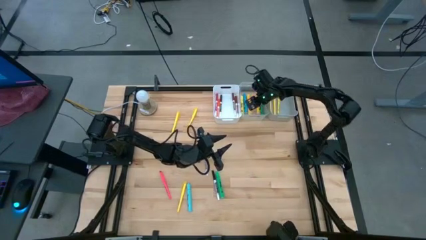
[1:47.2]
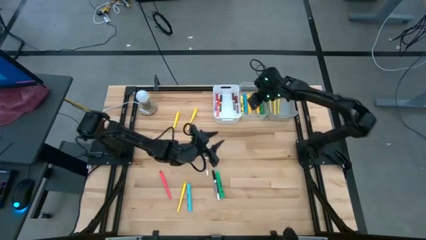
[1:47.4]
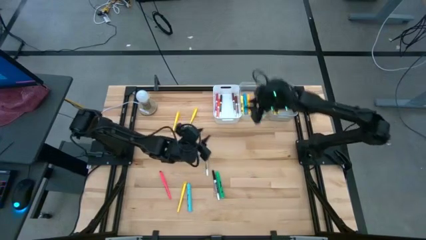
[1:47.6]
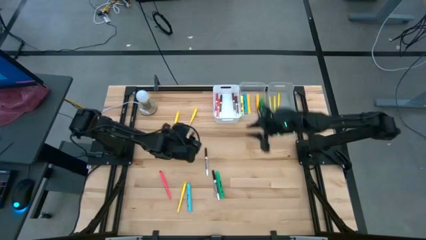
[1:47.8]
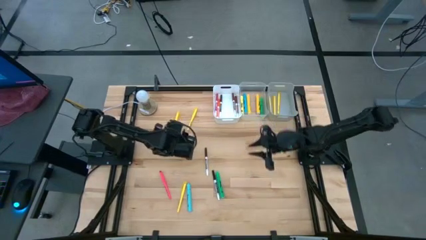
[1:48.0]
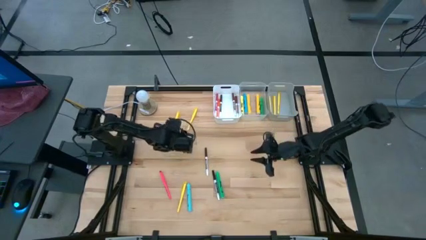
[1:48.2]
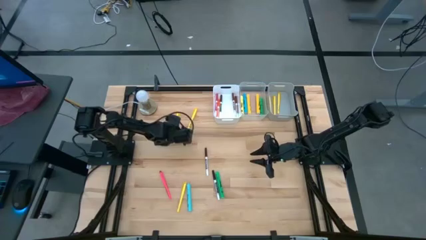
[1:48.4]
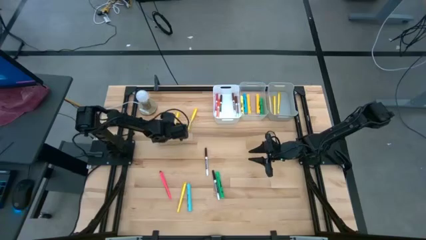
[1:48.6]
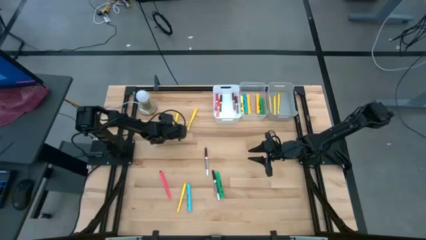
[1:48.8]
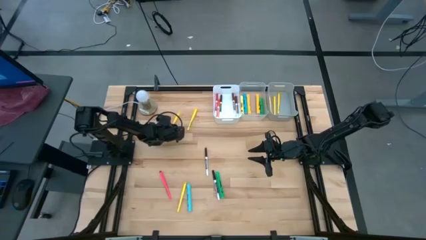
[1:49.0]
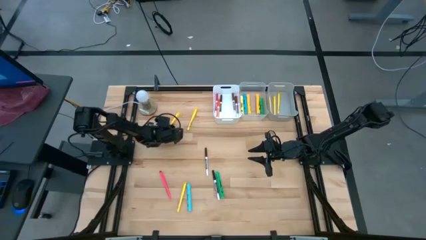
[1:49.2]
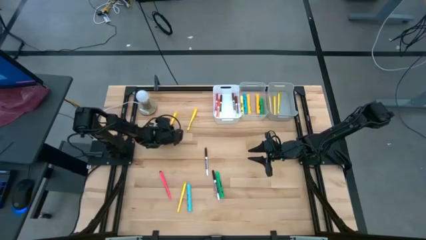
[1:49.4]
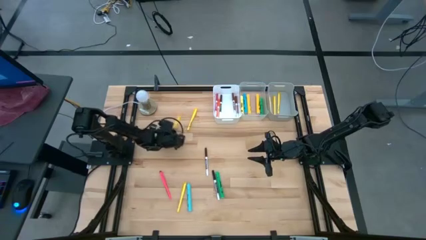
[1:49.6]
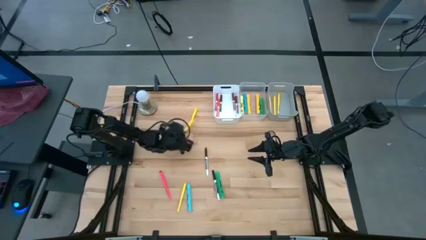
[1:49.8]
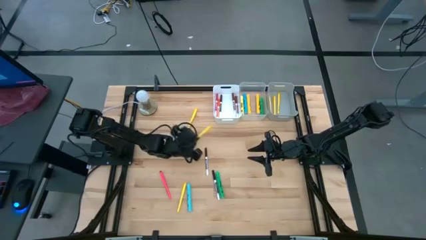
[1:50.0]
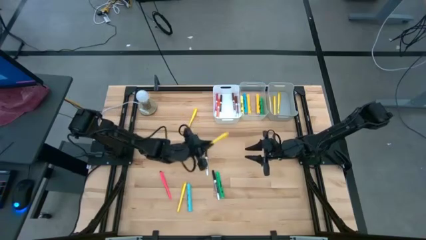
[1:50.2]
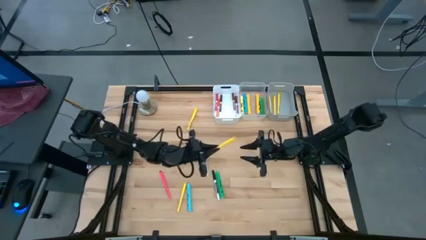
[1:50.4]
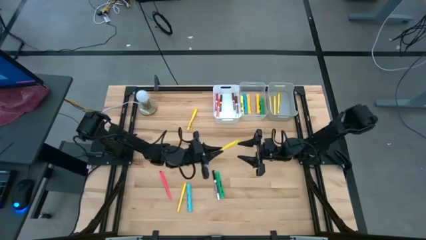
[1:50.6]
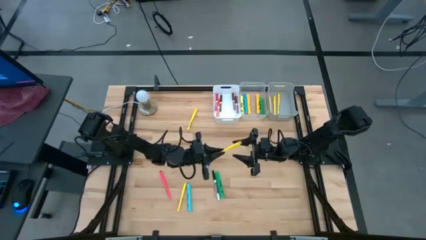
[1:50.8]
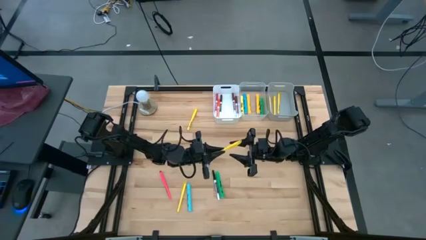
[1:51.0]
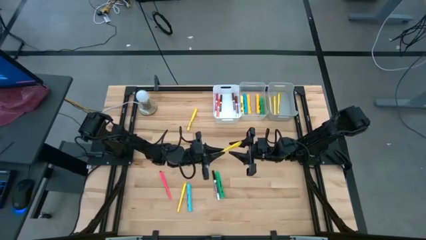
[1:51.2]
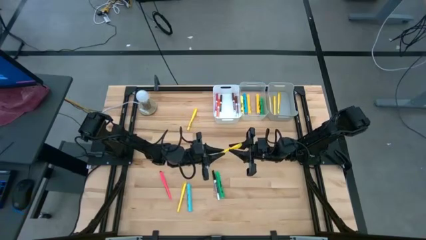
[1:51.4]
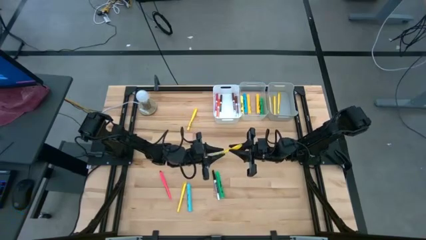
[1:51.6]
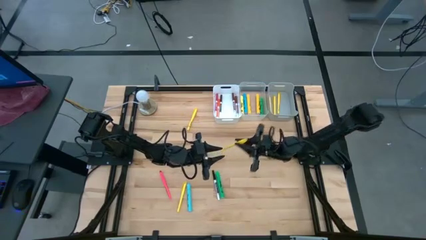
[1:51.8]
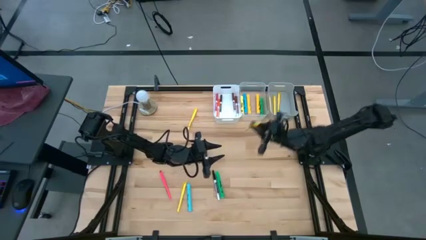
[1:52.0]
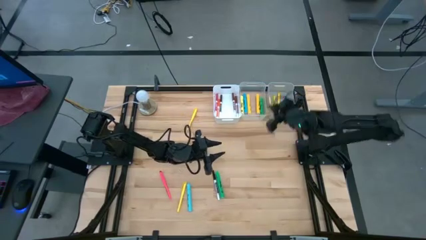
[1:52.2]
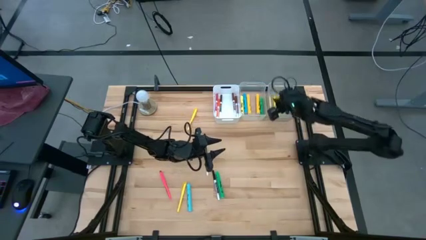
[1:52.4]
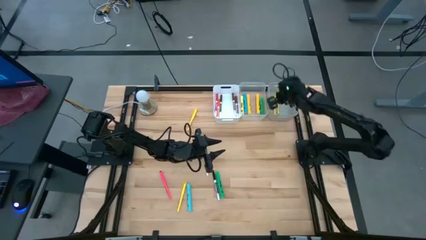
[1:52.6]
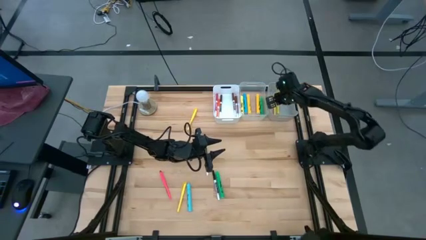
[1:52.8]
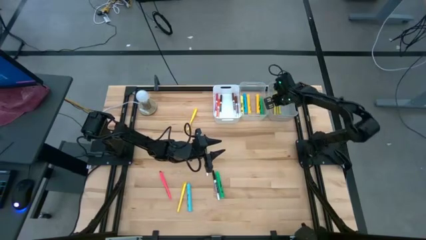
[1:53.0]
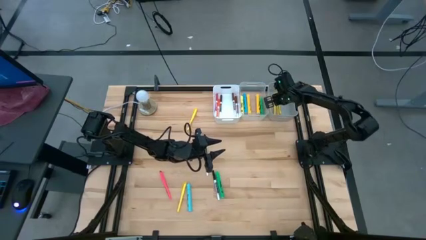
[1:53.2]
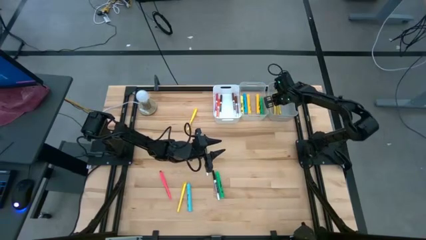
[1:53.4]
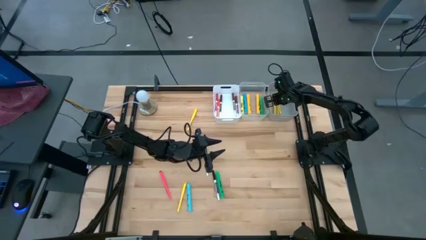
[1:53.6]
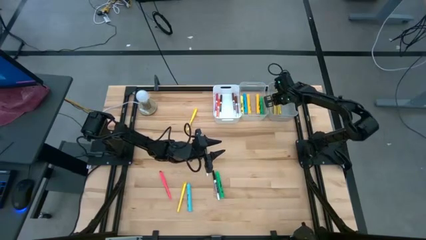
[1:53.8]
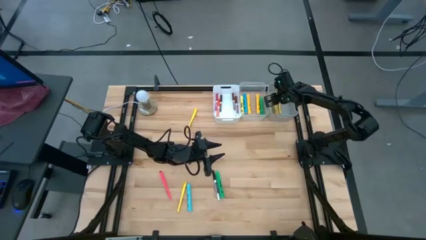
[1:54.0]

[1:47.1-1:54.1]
Task: Pick & Place Markers
Put the yellow pen into the gray bin

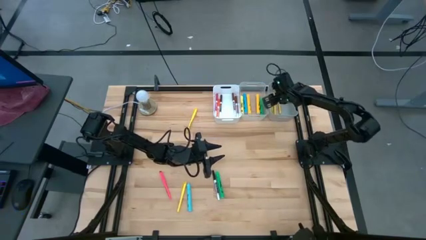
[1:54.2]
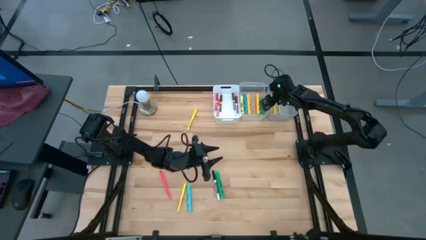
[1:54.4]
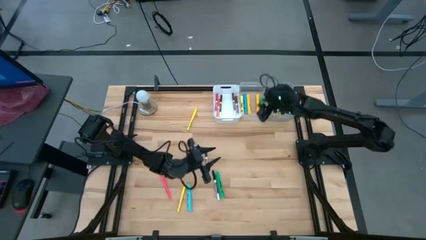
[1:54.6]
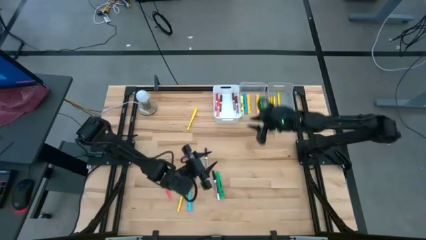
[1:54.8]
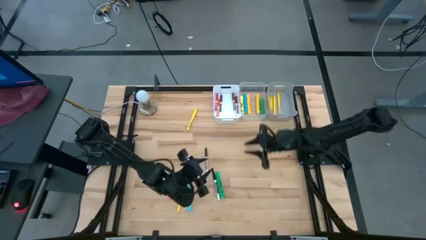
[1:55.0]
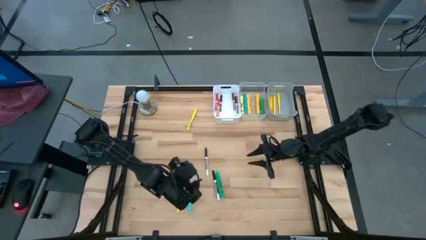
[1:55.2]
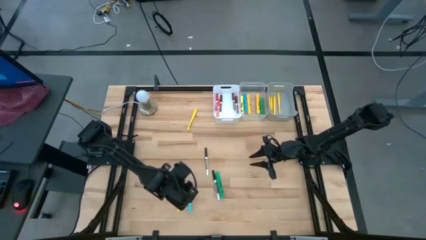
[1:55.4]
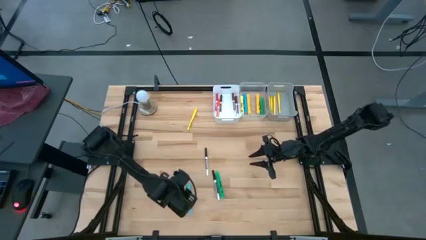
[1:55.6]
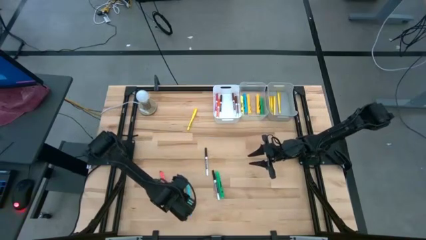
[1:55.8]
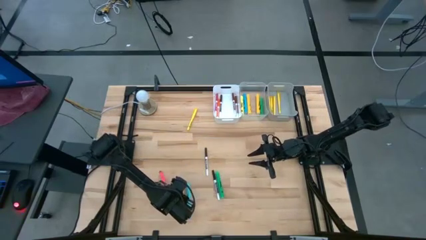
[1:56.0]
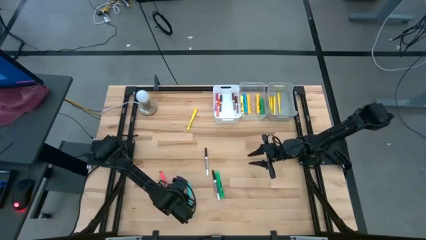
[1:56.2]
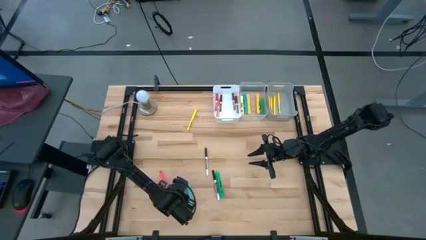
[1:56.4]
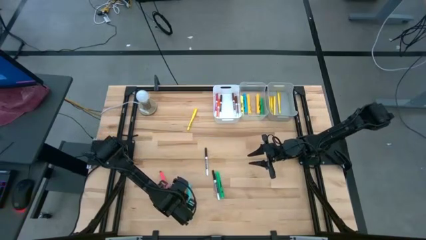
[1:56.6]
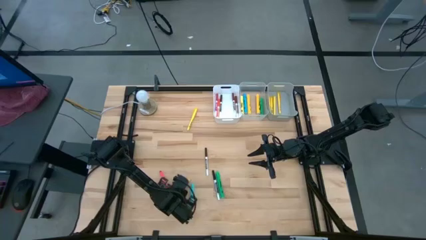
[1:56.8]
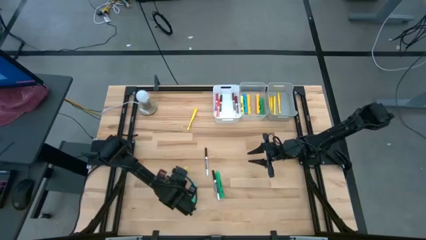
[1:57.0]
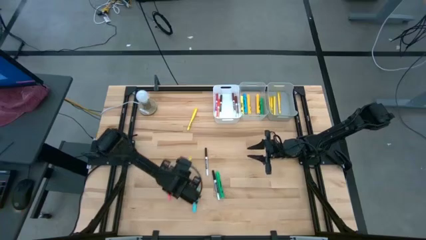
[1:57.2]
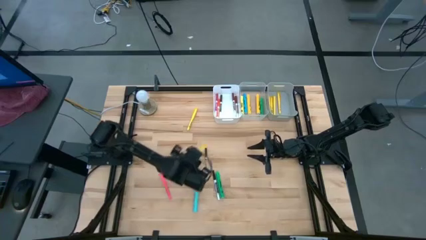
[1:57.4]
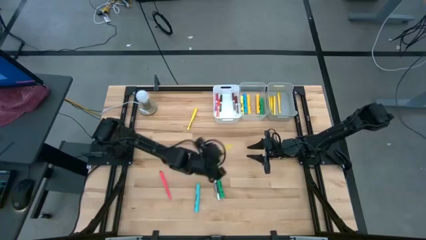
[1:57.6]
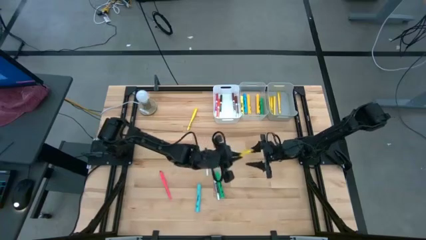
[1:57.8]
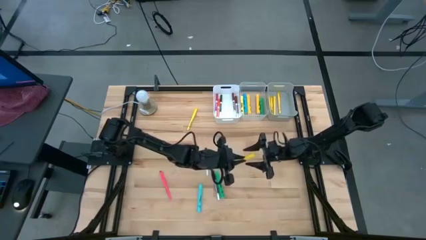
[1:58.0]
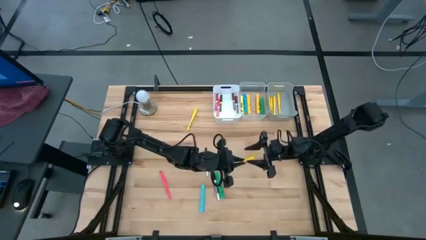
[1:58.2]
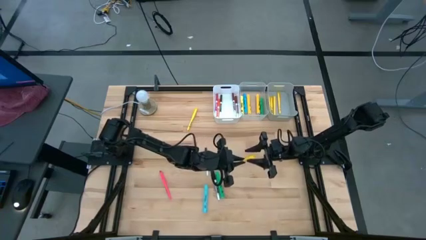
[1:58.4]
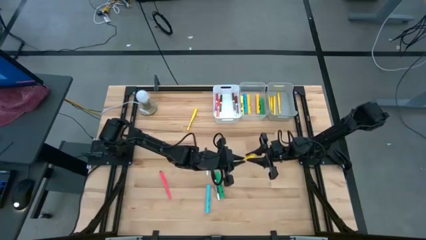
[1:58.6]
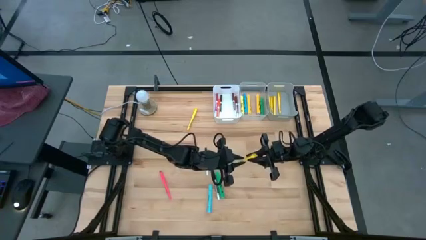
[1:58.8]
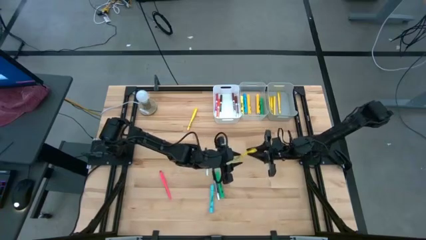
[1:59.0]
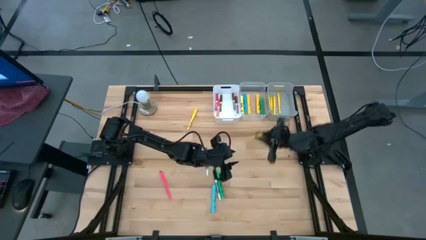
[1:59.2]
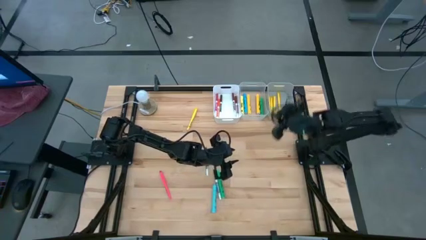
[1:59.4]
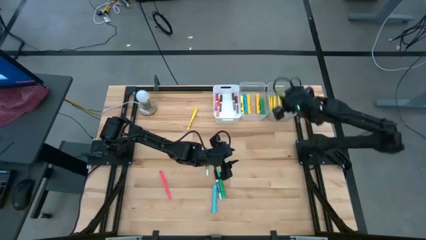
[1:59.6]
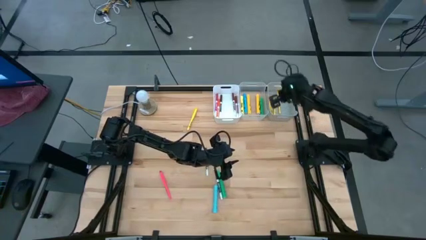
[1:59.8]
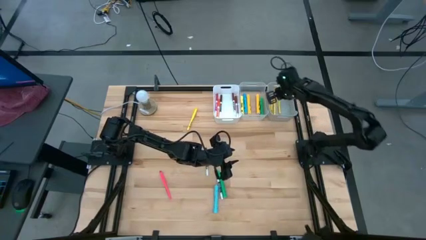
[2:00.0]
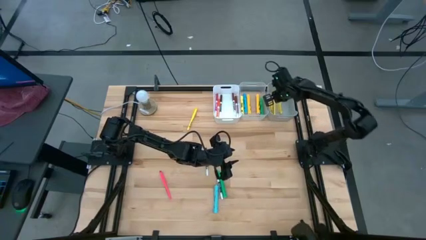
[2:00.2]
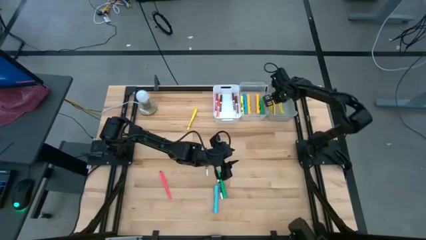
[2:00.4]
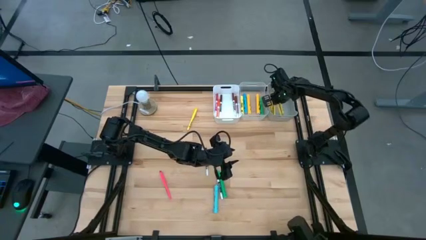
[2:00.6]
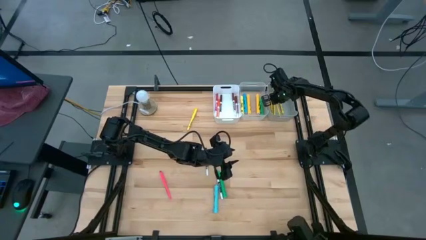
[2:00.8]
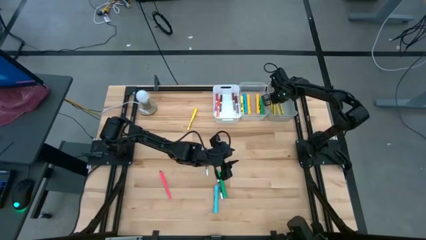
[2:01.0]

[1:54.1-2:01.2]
Put the yellow pen into the gray bin

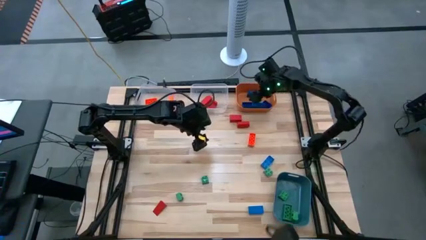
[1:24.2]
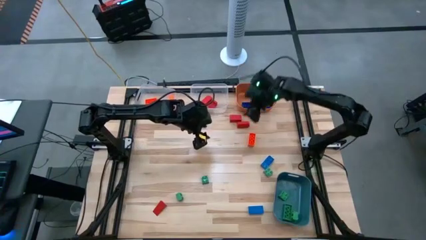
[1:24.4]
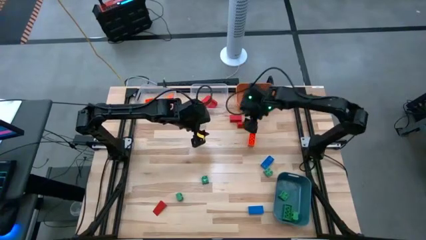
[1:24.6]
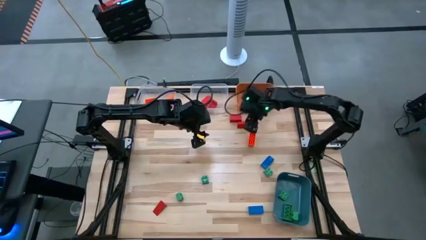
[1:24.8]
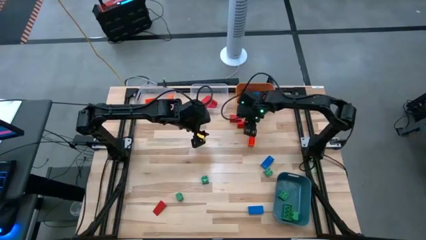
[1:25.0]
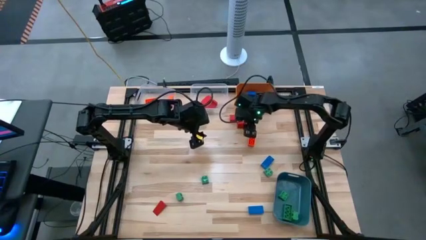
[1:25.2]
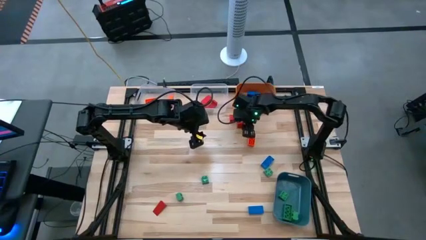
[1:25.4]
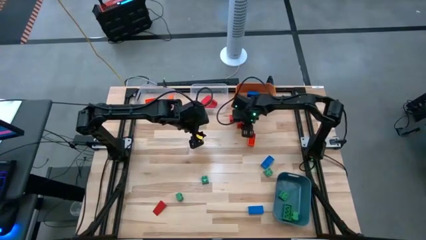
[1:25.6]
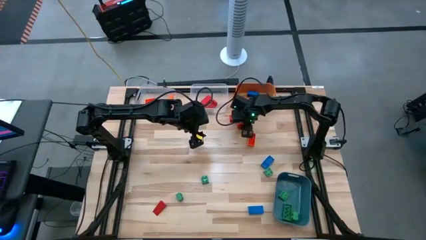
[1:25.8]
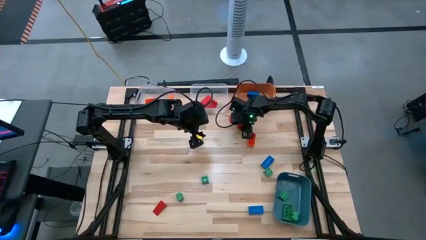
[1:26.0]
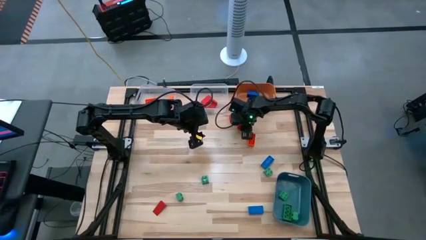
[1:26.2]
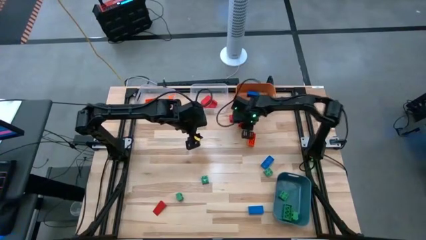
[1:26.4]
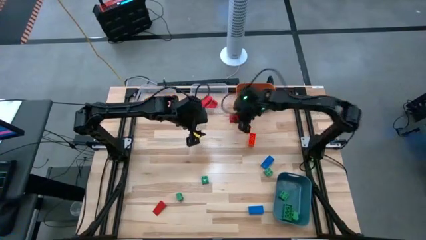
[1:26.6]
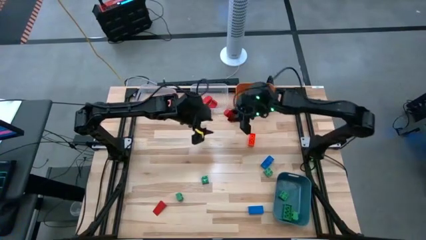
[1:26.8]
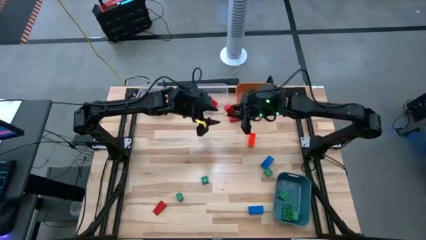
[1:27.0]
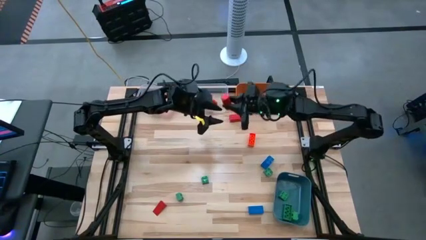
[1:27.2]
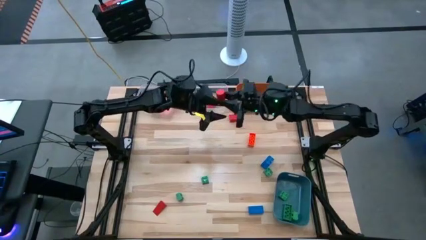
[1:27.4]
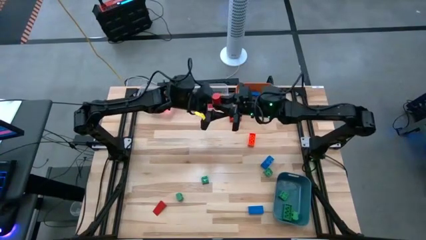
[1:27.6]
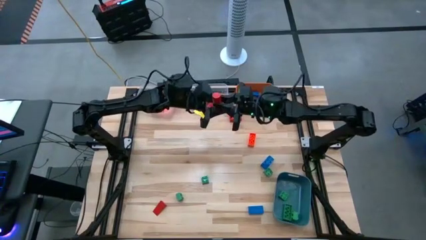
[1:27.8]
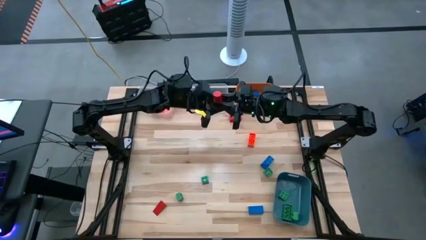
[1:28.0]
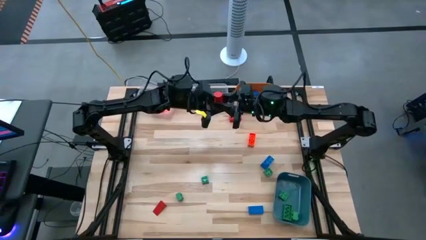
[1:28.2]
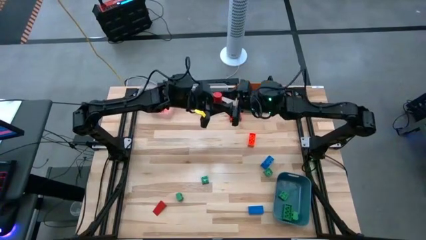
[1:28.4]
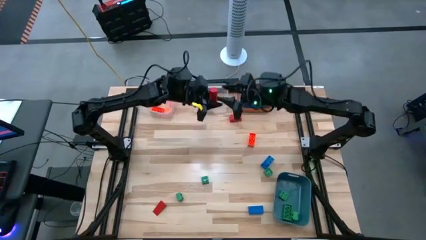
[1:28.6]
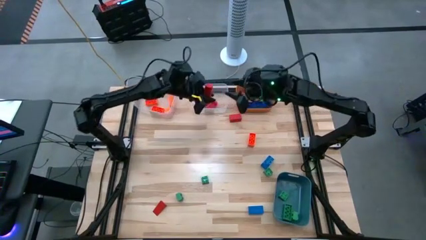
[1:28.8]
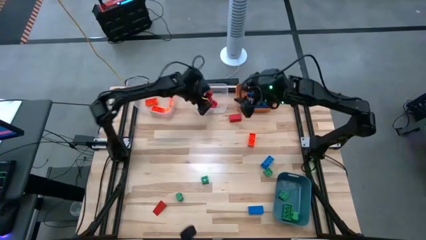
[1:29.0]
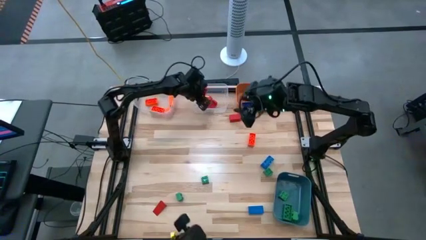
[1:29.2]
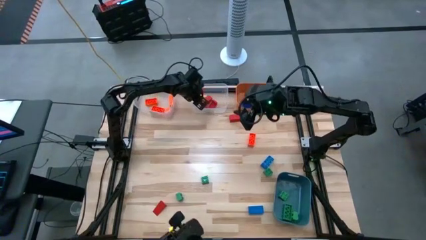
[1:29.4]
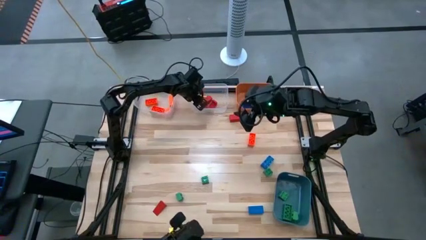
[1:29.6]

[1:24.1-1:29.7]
Task: Sort blocks
Put the red block into the right transparent bin
